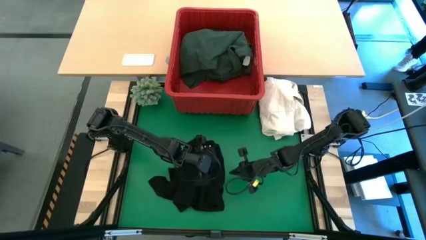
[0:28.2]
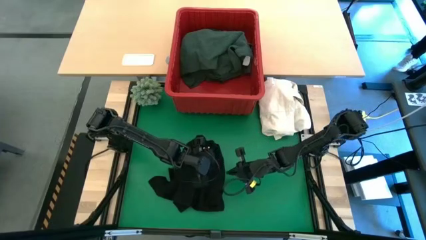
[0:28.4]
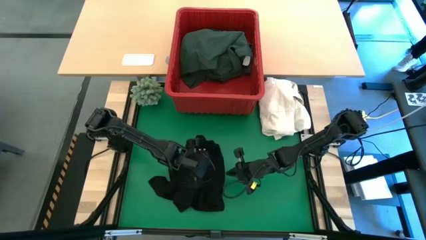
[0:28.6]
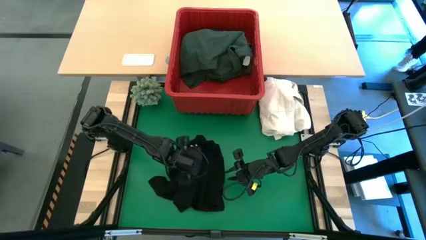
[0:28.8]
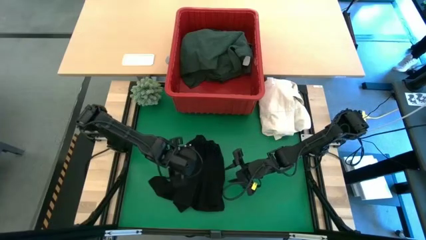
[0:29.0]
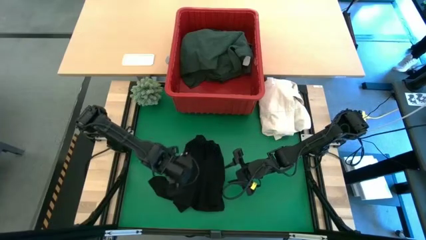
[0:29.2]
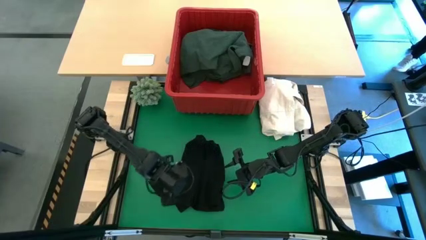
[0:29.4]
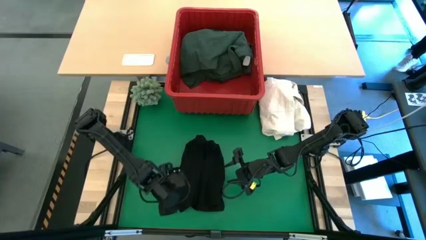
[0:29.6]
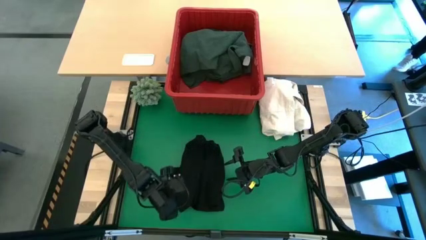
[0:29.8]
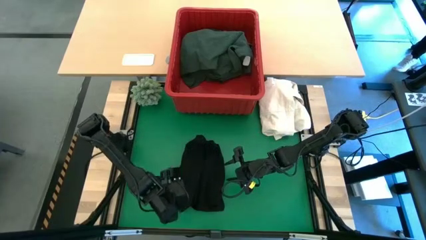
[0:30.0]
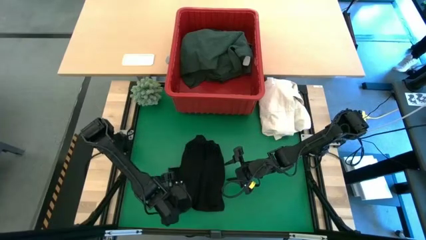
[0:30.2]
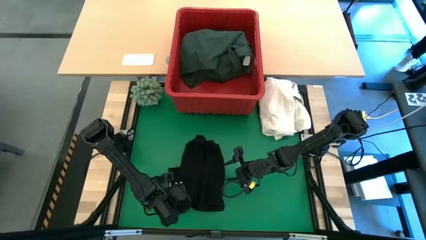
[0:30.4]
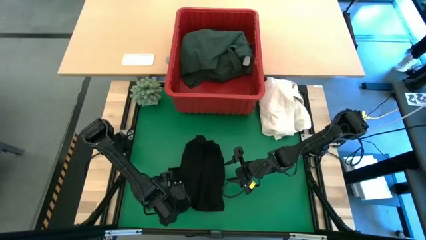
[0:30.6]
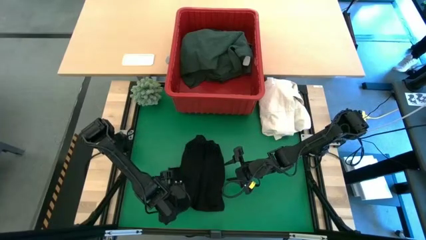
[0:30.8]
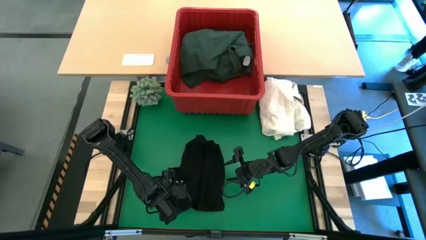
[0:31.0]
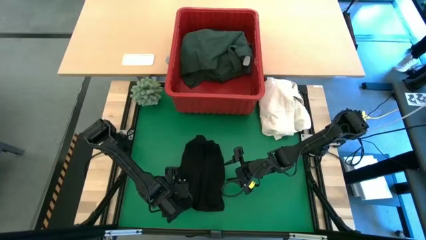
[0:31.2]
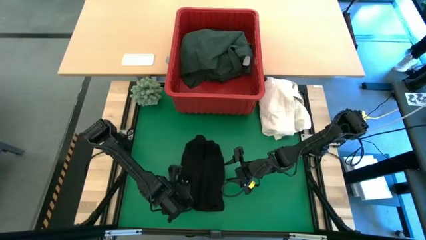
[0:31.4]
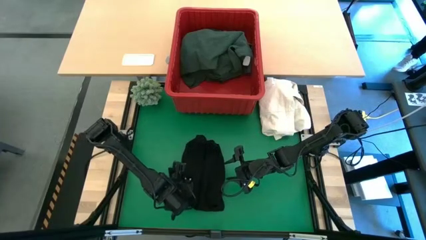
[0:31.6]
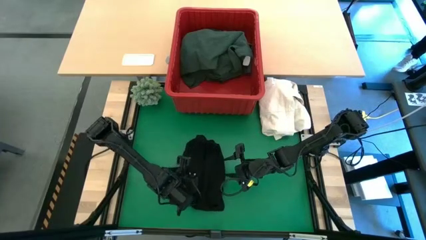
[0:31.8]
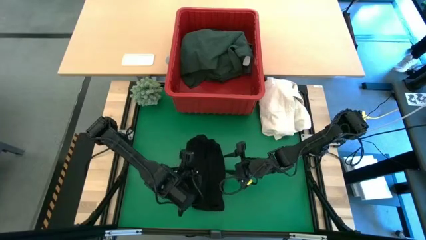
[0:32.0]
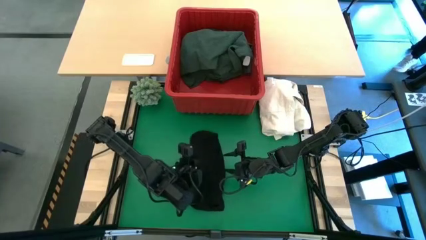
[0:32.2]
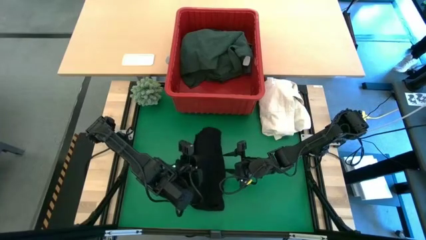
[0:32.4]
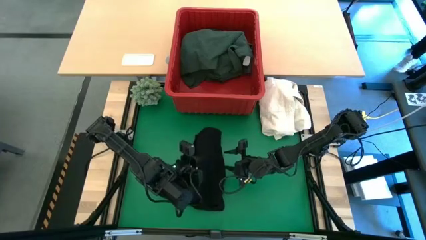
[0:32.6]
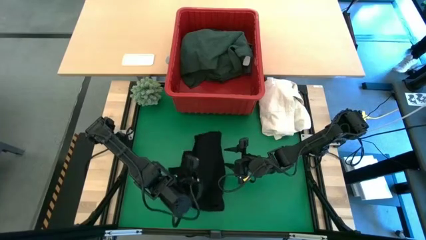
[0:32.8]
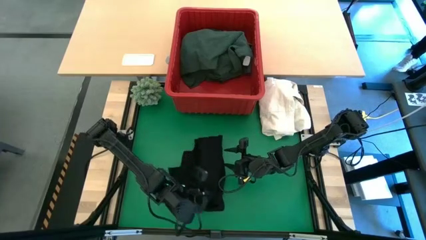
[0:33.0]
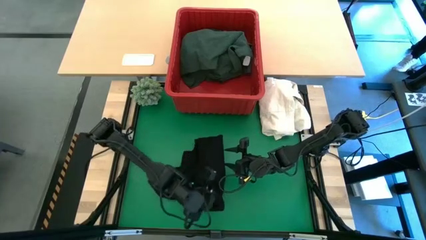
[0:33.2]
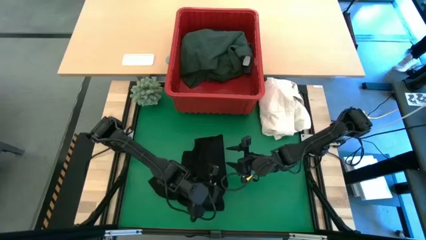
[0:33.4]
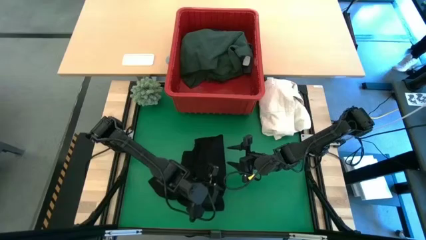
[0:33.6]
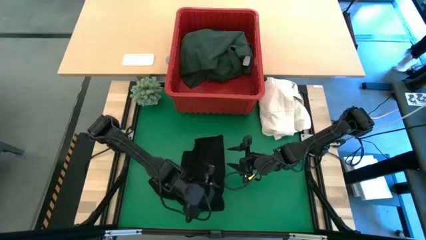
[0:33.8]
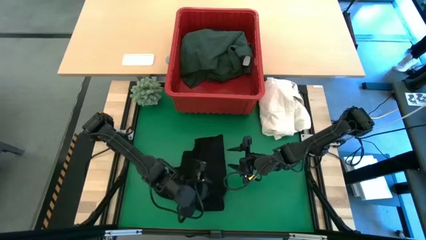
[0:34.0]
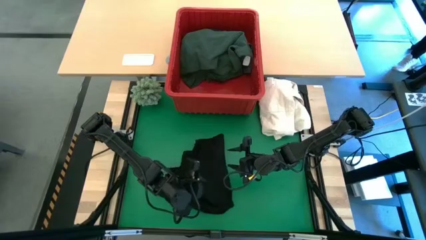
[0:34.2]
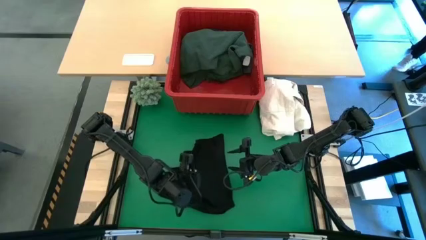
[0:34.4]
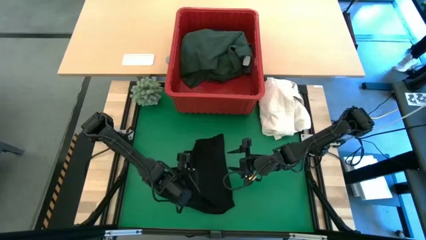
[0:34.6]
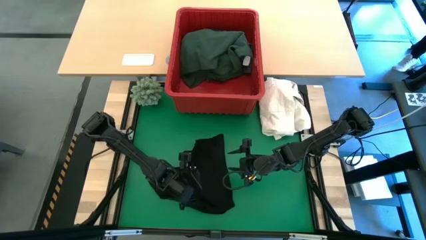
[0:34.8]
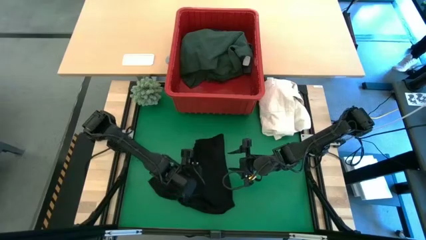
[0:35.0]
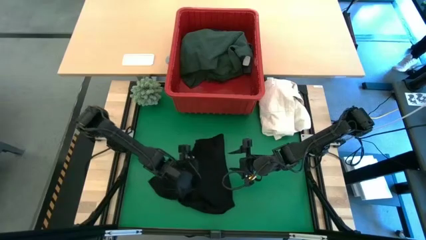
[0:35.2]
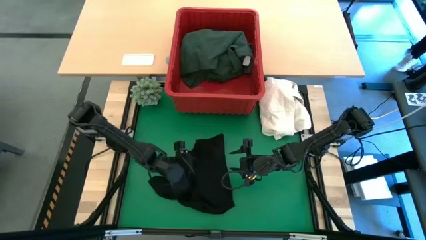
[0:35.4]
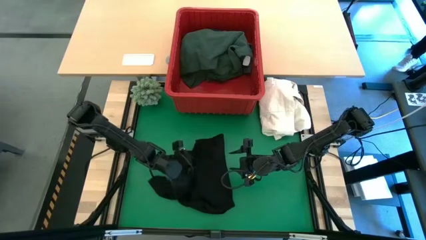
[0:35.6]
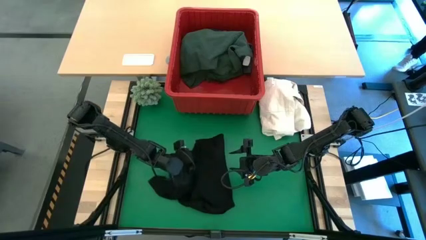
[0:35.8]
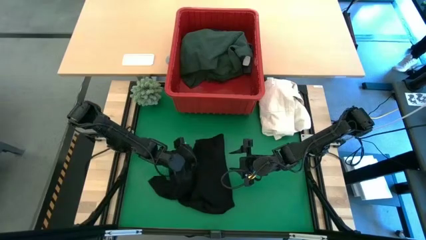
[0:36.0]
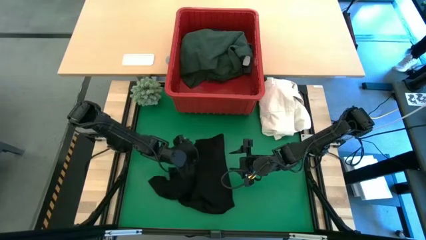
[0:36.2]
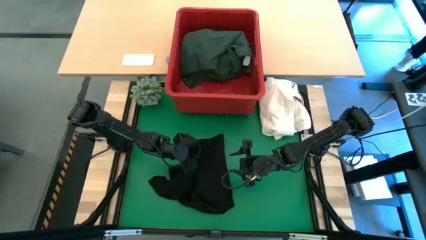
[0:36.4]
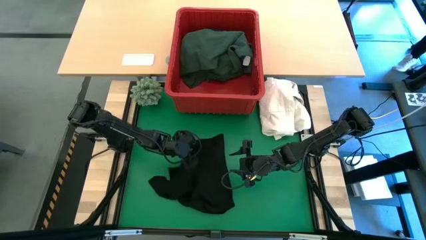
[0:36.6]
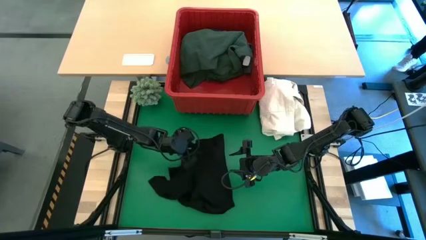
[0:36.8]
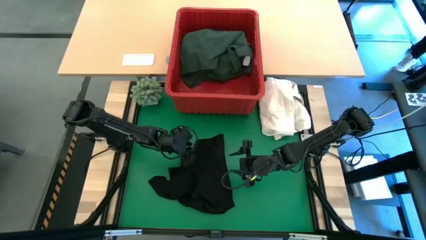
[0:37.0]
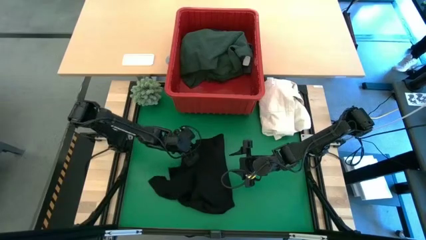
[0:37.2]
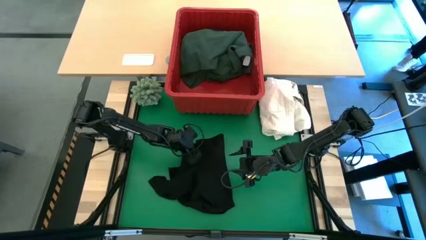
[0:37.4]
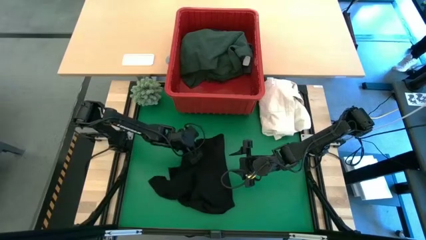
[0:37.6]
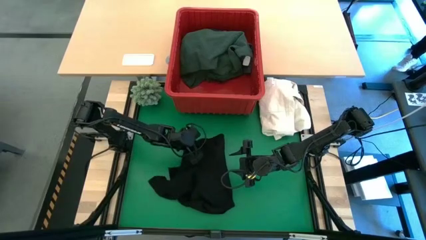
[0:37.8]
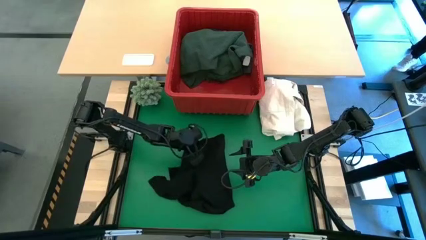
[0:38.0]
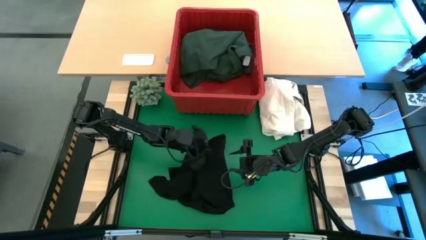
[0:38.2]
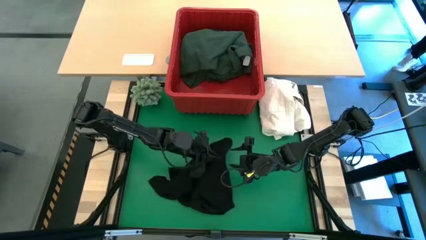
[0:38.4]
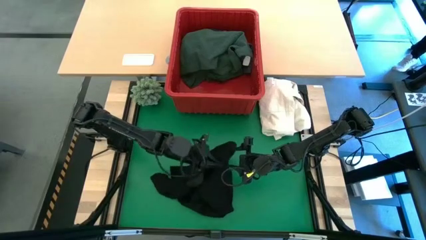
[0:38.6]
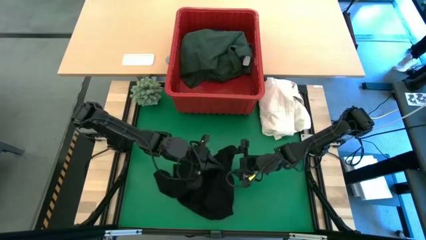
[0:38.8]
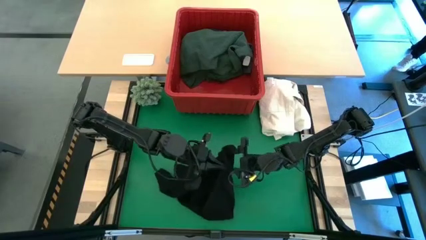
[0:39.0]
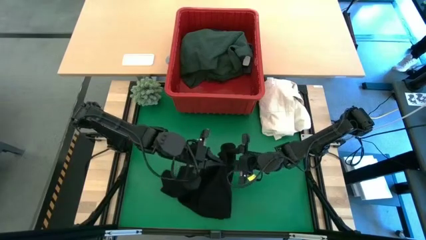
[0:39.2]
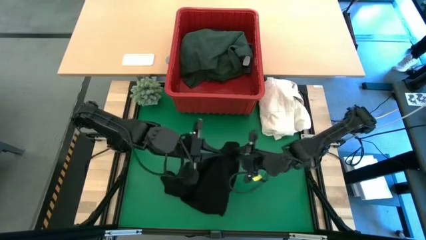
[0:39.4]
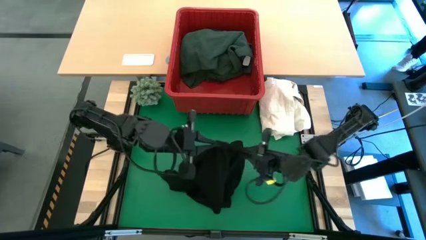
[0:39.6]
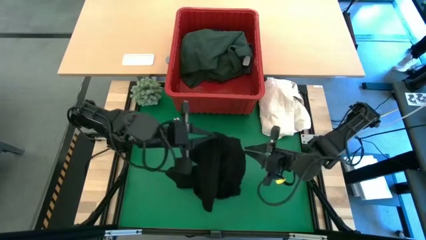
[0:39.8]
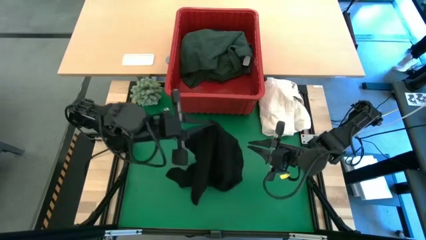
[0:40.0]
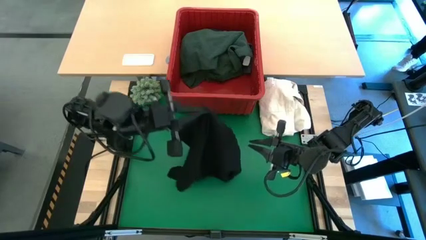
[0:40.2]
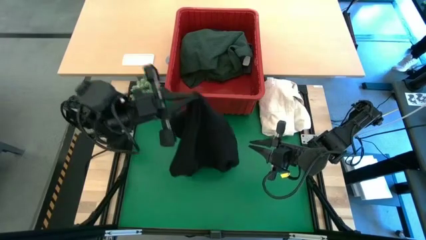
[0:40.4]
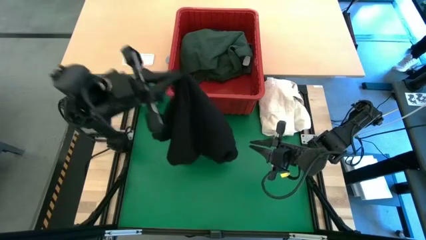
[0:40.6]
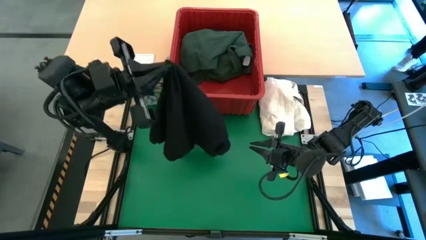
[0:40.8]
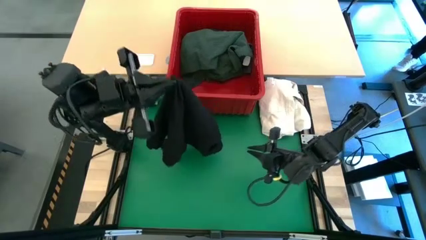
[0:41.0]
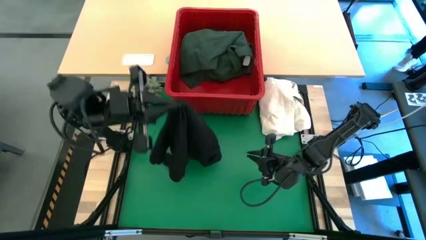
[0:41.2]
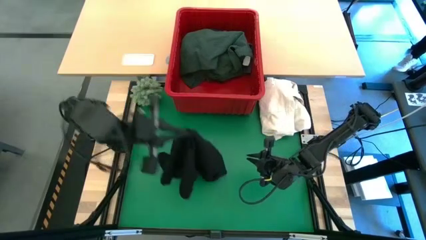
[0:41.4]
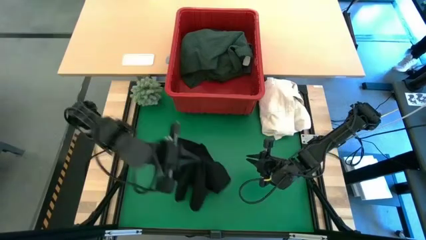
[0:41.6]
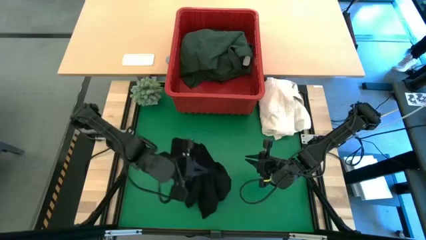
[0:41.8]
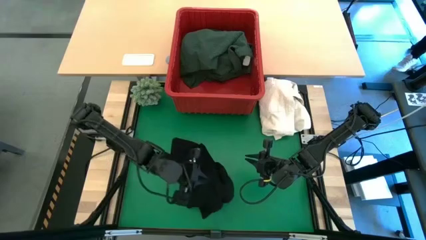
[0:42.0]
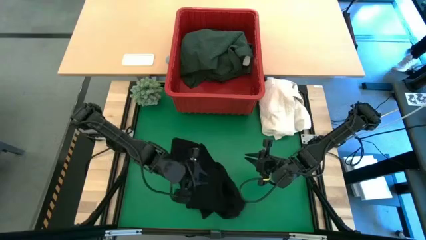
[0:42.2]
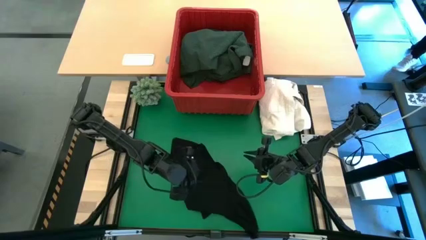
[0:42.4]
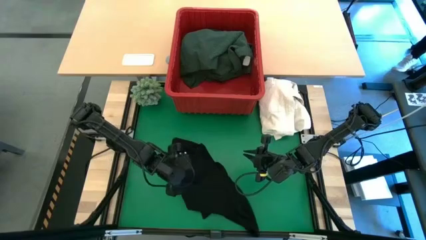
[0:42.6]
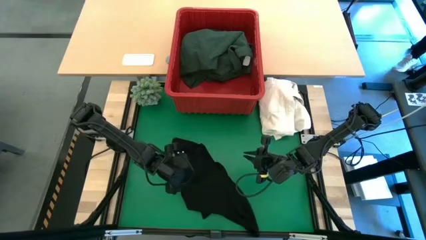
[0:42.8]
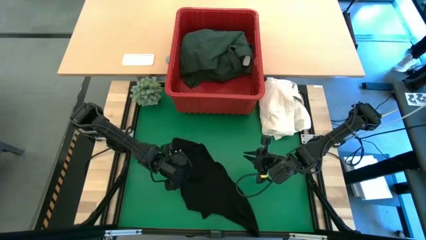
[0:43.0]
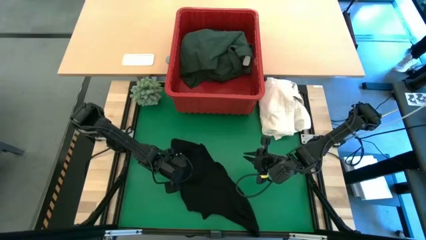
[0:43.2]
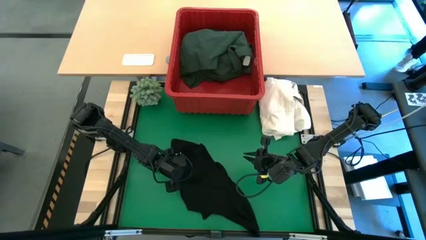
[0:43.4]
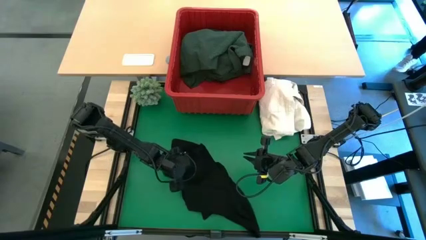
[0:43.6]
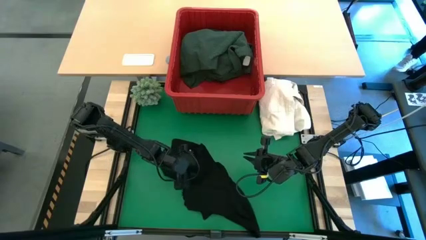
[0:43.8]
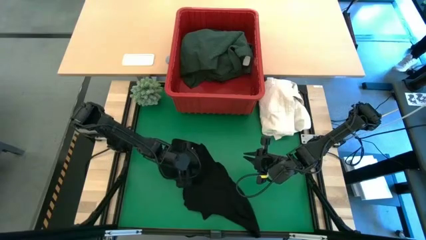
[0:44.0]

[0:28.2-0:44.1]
Task: Fold laundry
Fold the black shirt

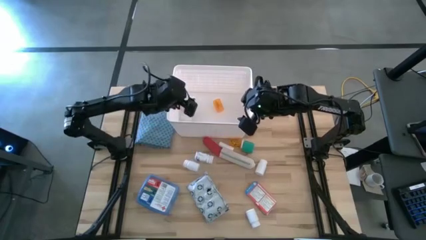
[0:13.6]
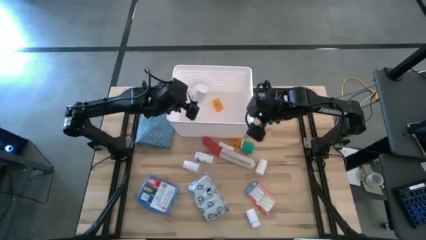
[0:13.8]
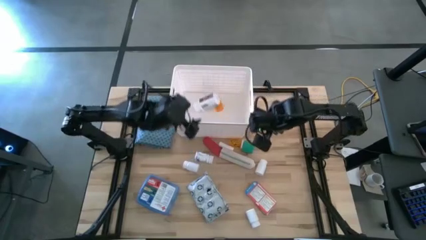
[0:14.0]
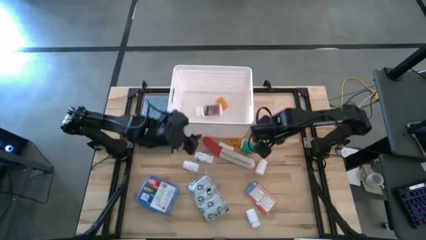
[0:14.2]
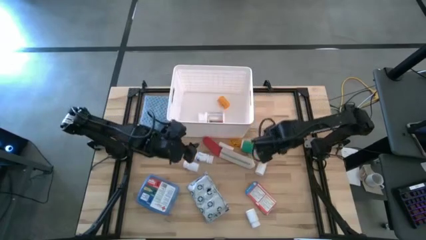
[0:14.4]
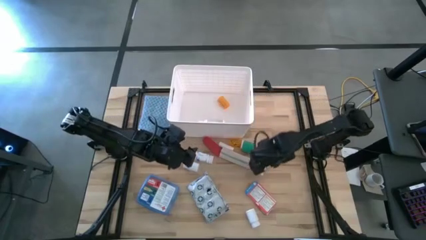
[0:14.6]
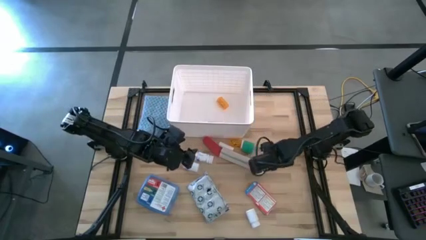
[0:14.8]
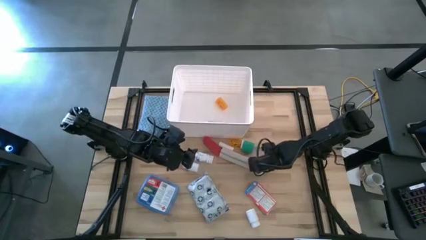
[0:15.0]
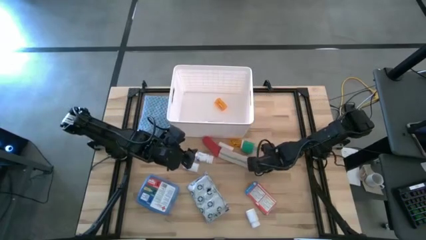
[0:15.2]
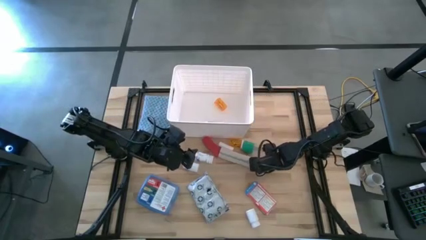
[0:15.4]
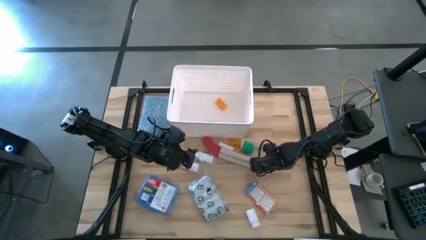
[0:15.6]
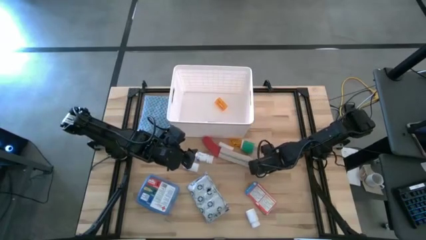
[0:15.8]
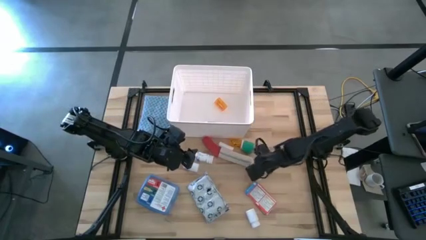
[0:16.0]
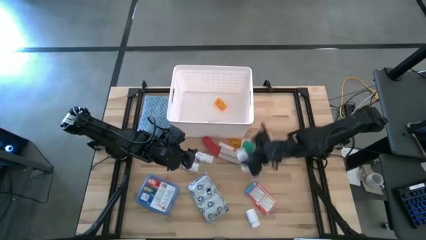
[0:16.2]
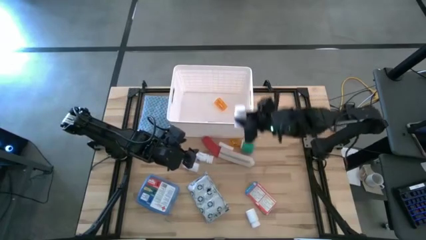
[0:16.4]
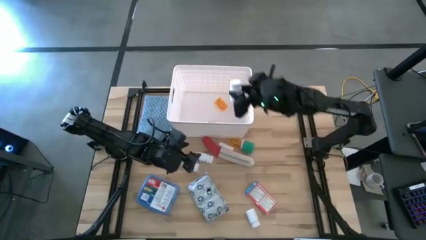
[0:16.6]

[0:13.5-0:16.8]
Task: Pick & place medical supplies in basket/bin
Put the top right white medicine bottle in the white bin
